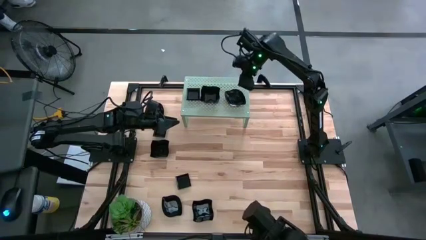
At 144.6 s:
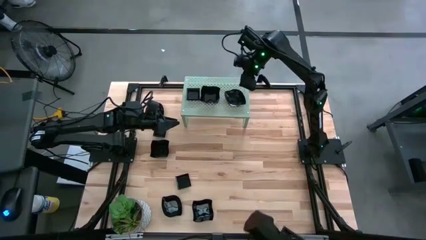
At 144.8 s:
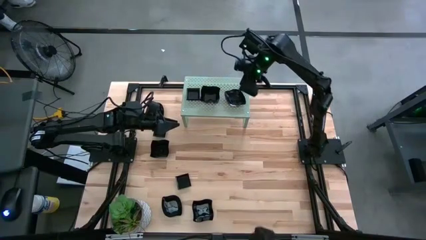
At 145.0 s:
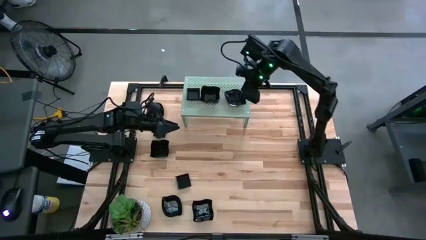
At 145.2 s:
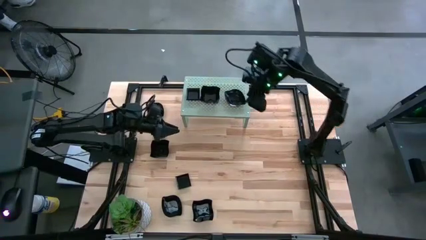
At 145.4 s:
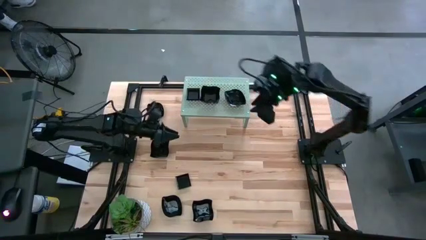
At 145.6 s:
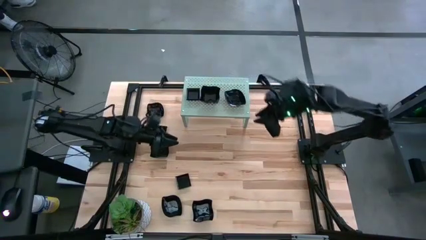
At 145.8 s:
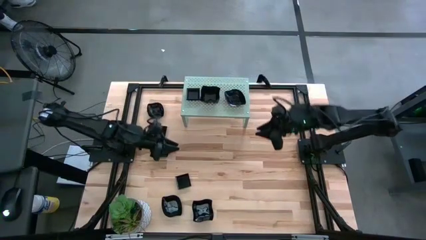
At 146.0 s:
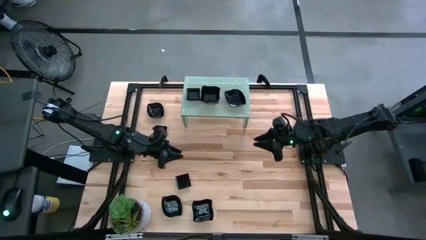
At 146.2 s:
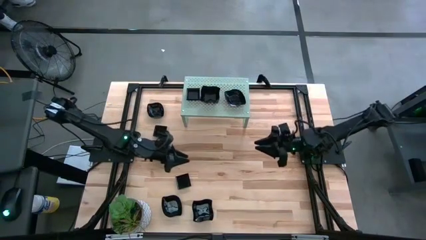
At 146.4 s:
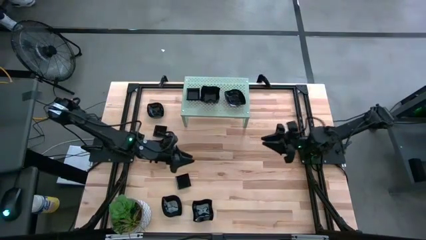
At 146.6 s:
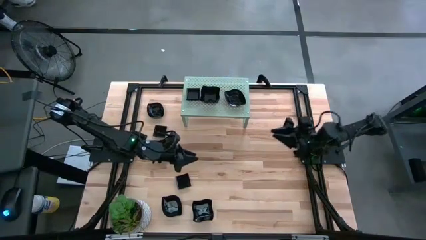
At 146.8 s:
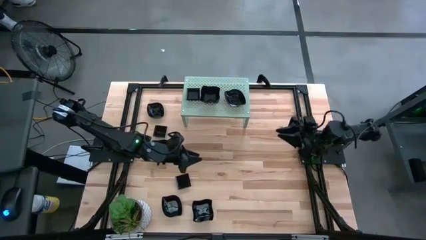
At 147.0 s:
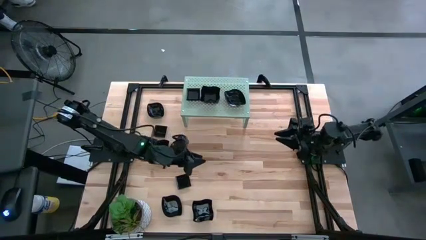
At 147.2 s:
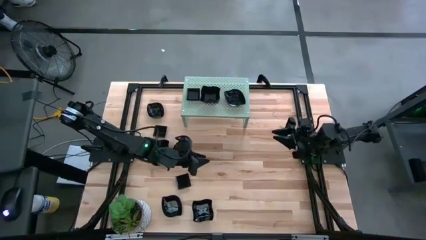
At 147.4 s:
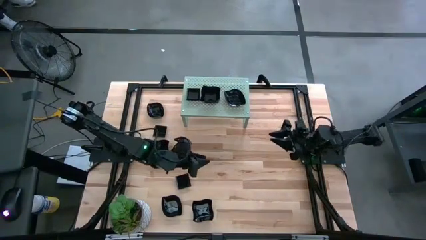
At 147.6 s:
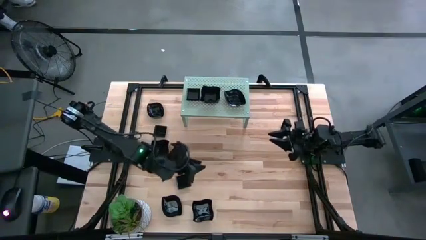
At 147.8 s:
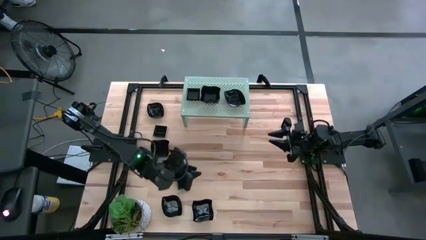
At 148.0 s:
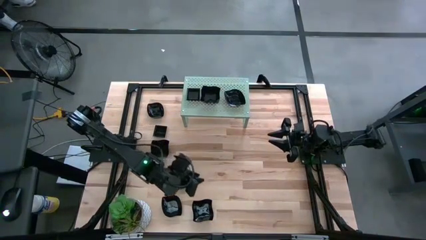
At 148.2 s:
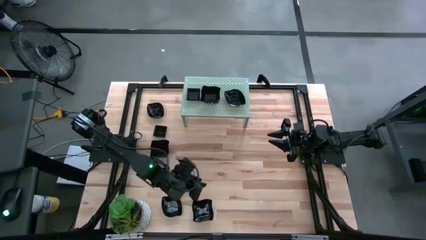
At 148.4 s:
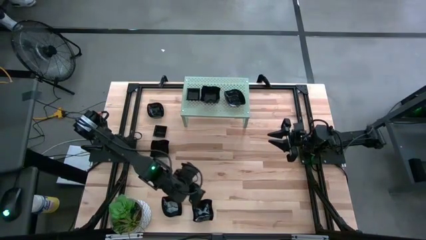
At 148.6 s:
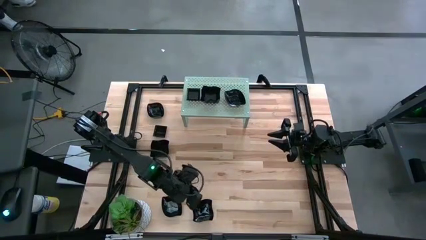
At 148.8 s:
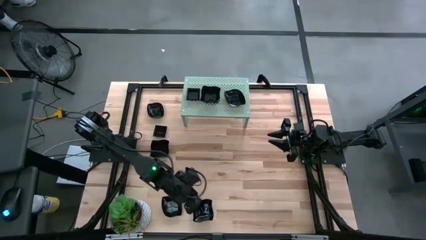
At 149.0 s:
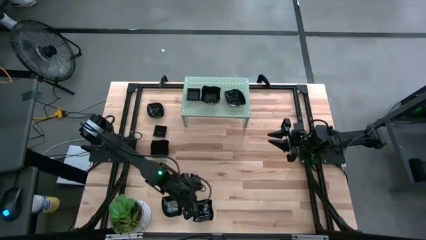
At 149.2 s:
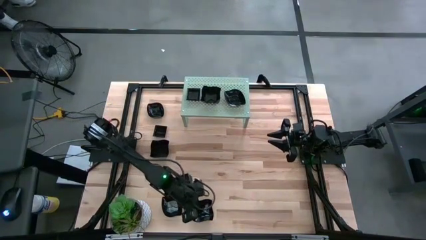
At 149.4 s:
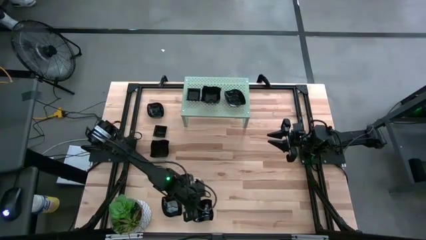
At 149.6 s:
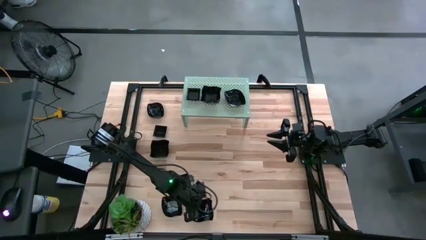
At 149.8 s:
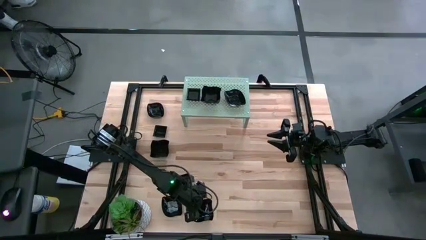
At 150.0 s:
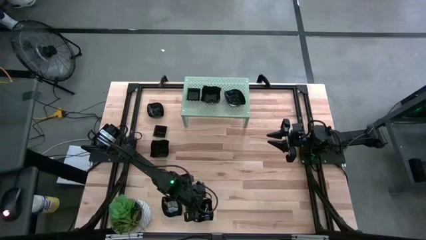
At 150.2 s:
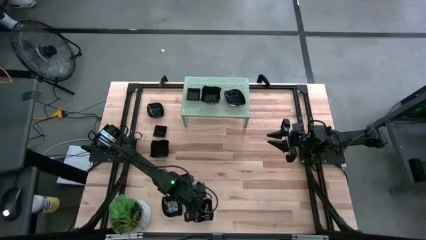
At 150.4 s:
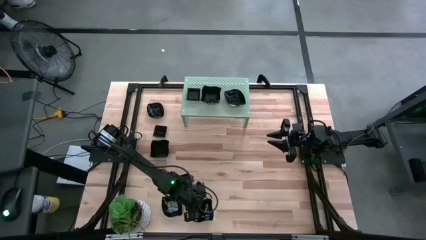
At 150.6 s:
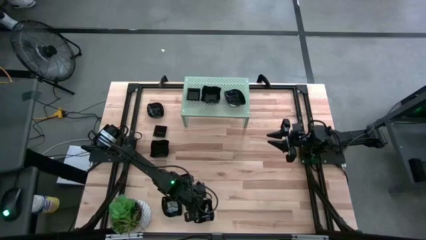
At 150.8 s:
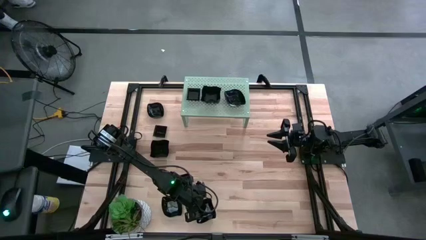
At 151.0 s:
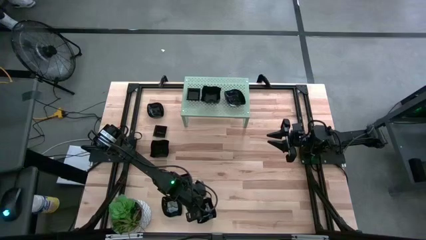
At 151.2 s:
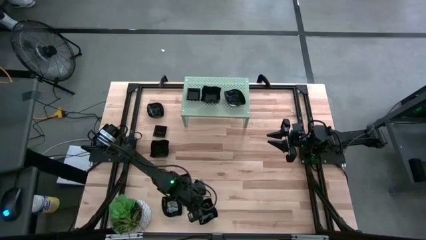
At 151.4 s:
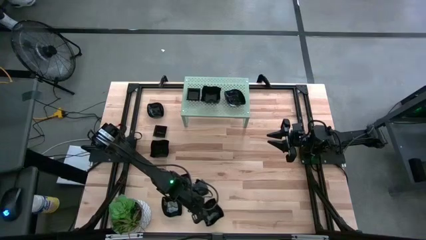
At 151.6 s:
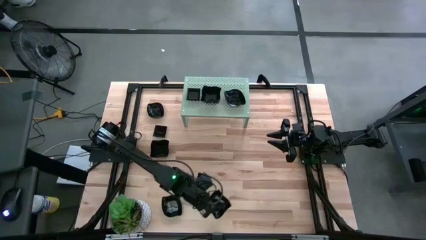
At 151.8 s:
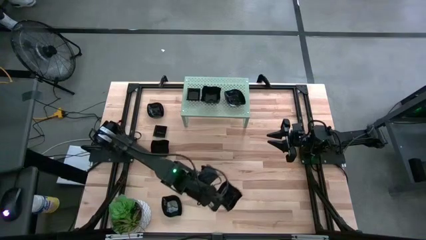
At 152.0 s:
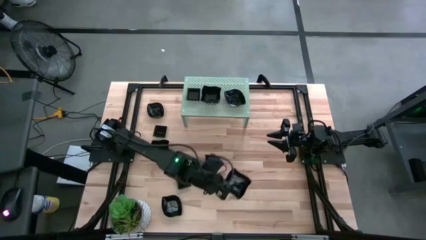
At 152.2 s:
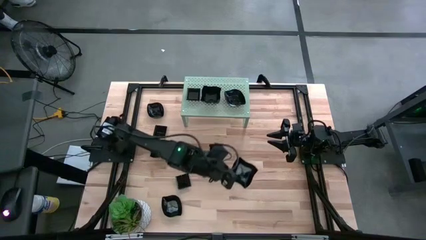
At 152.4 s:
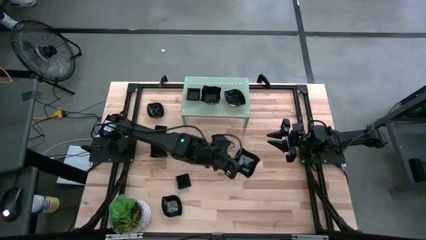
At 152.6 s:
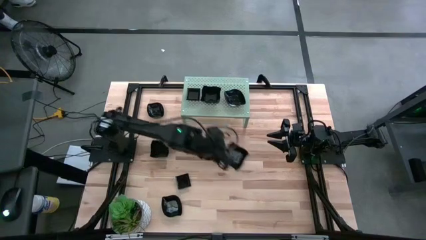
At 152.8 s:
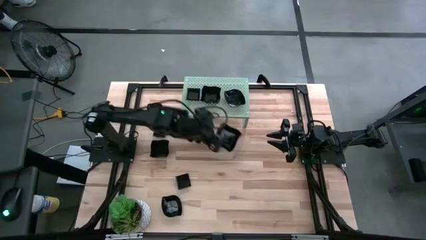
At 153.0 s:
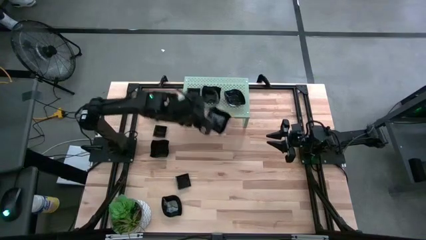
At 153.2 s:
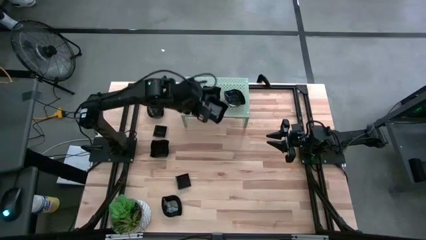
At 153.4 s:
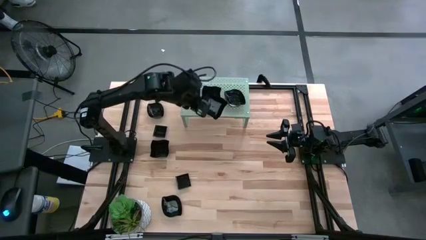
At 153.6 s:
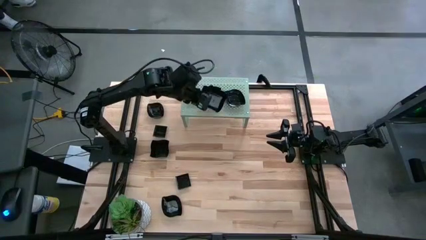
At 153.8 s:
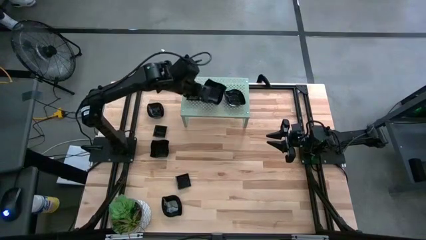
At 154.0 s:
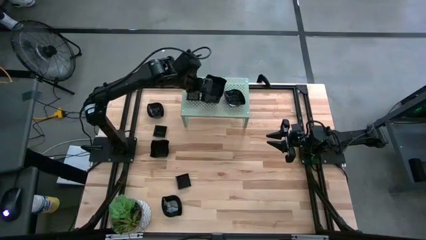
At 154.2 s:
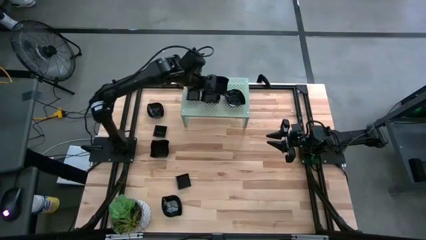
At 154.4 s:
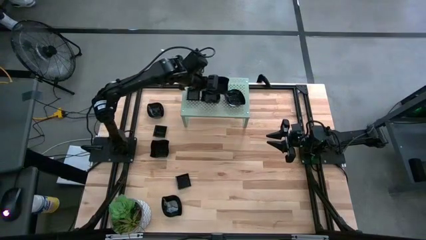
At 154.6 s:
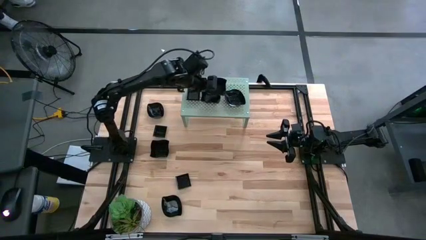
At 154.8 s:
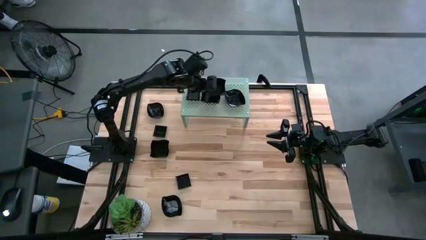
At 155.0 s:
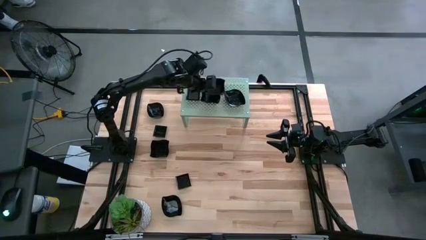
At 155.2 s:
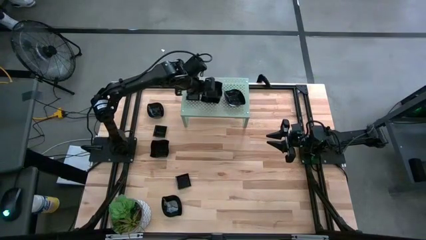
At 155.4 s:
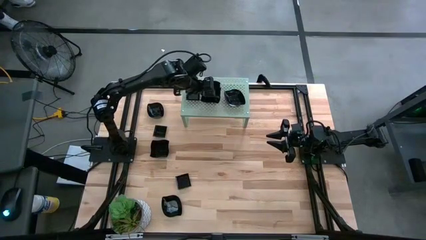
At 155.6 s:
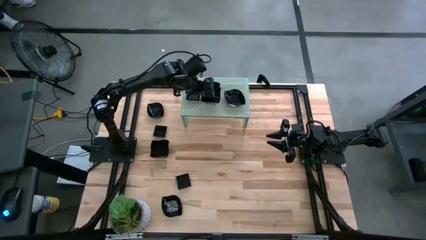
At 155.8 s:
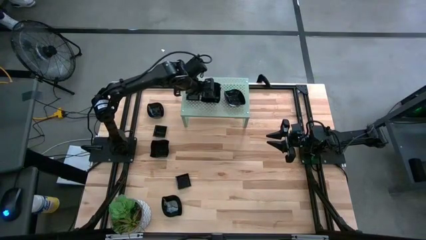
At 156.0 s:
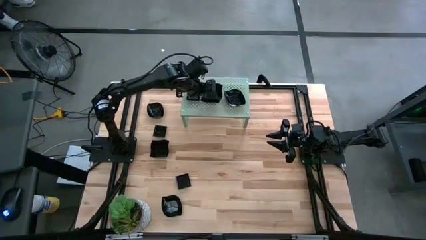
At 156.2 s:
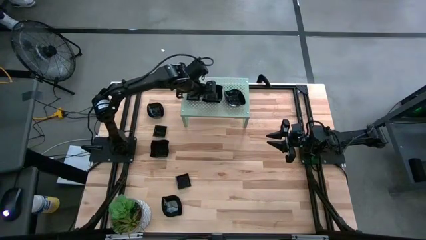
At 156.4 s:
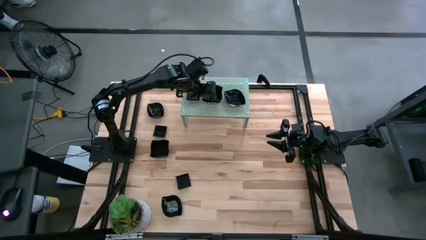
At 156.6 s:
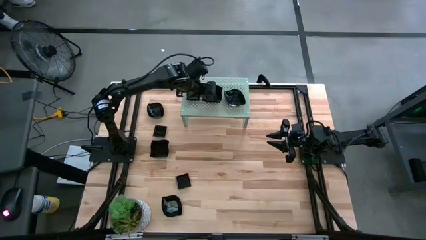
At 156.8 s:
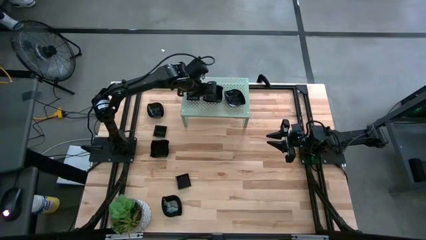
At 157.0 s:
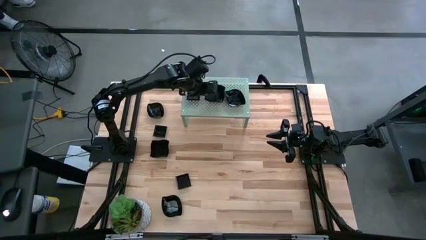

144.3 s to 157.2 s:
Task: Pick & Place Mini shaped plates
Stack the wave square shaped plate on top of the wave square shaped plate on the shelf
